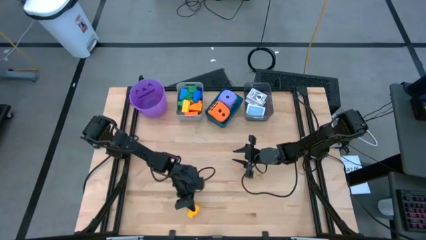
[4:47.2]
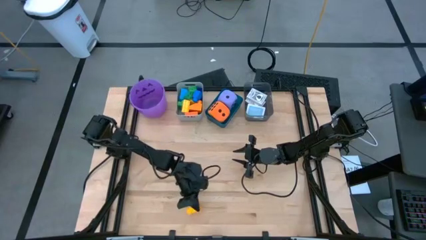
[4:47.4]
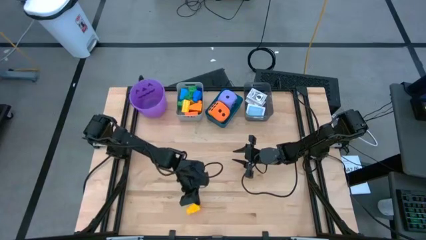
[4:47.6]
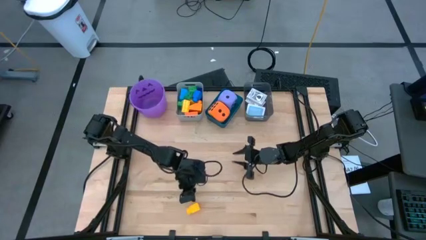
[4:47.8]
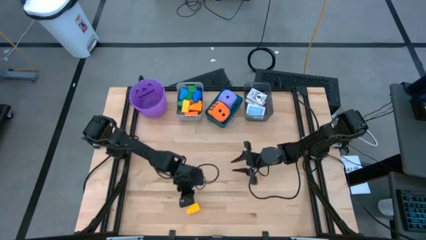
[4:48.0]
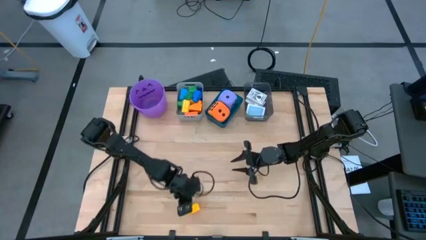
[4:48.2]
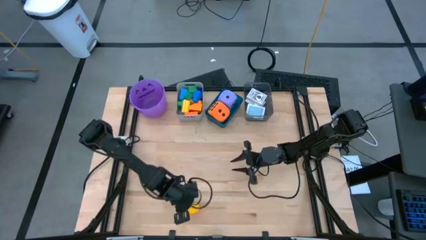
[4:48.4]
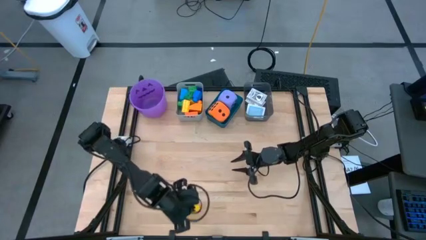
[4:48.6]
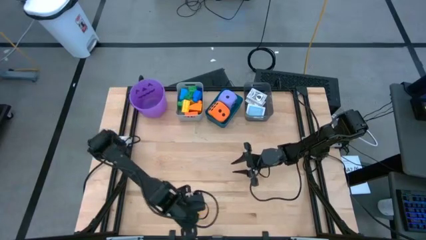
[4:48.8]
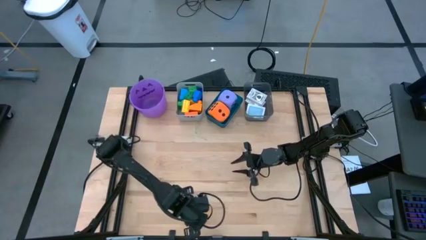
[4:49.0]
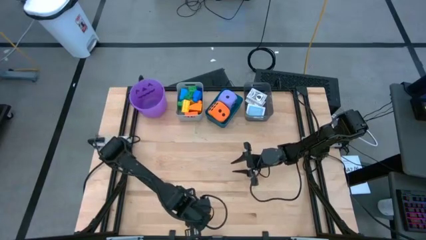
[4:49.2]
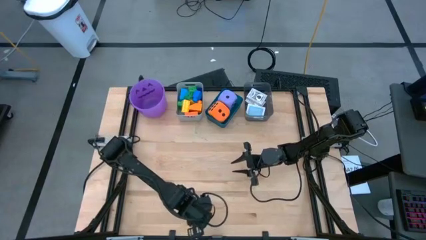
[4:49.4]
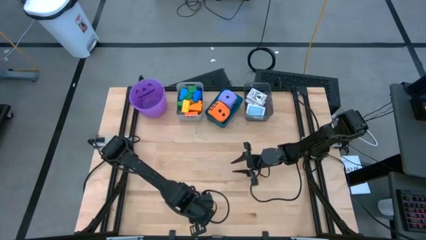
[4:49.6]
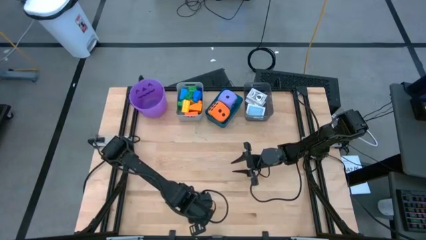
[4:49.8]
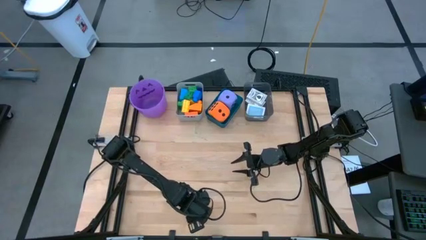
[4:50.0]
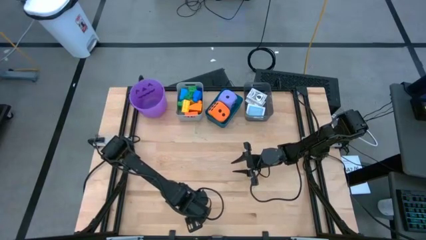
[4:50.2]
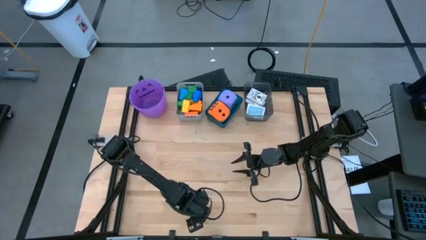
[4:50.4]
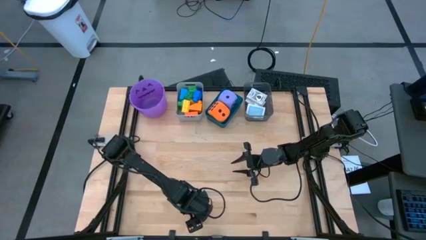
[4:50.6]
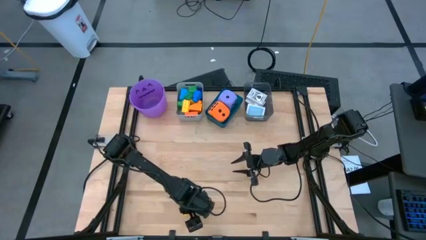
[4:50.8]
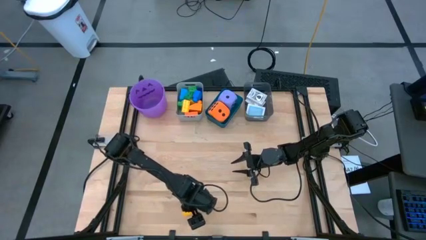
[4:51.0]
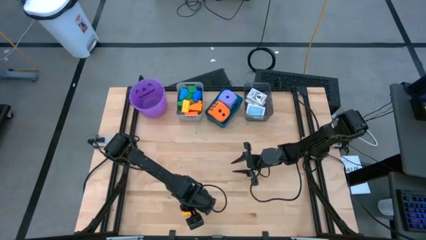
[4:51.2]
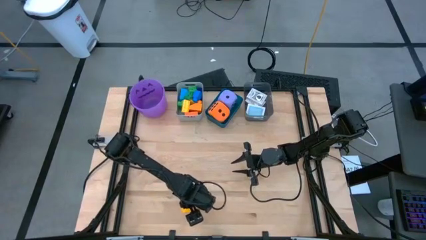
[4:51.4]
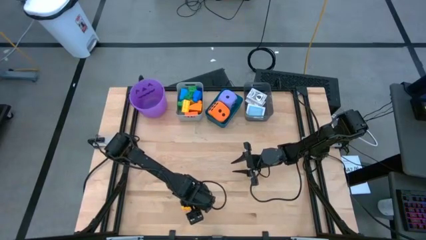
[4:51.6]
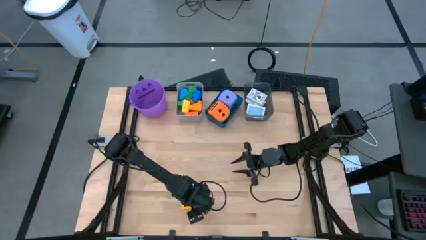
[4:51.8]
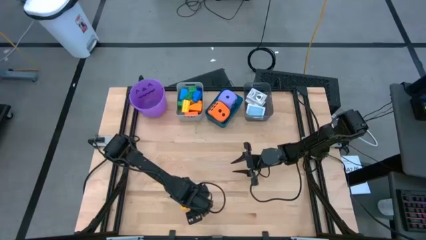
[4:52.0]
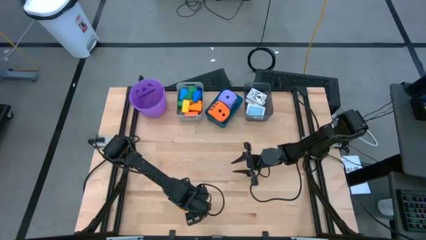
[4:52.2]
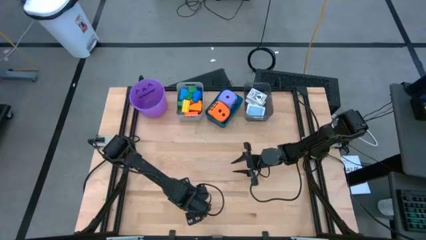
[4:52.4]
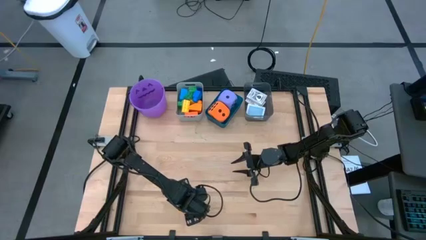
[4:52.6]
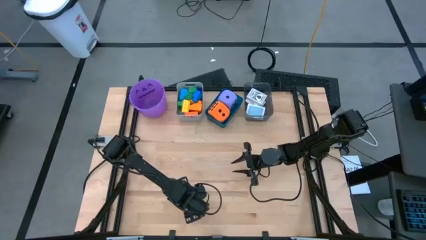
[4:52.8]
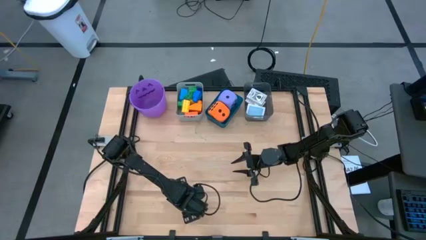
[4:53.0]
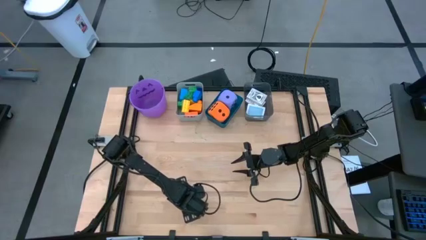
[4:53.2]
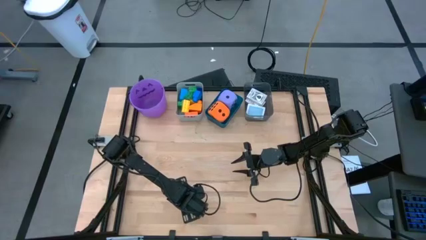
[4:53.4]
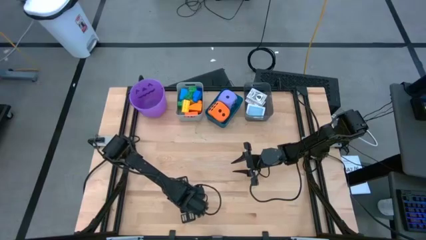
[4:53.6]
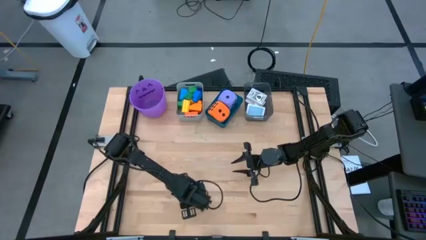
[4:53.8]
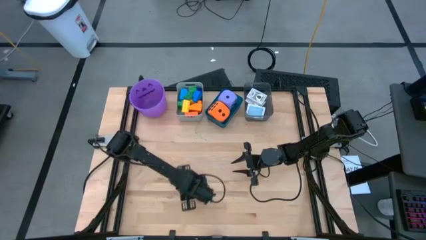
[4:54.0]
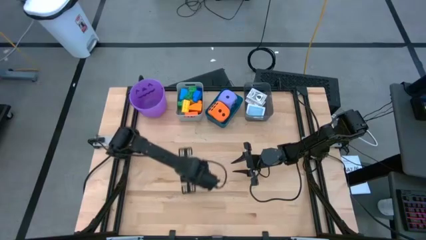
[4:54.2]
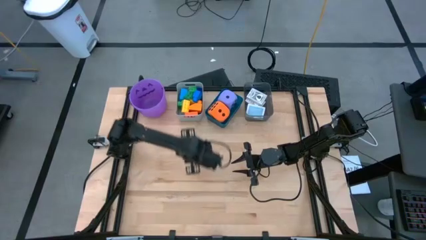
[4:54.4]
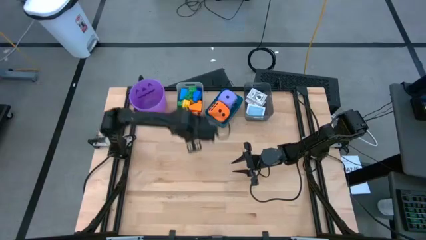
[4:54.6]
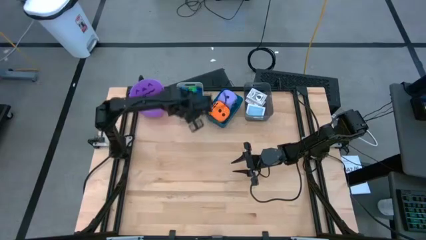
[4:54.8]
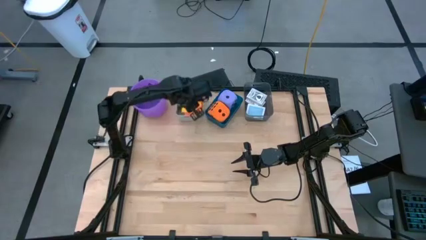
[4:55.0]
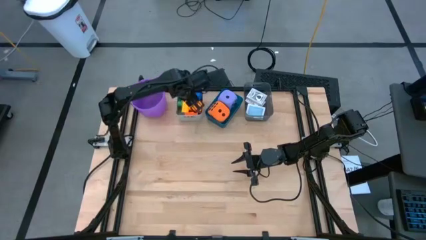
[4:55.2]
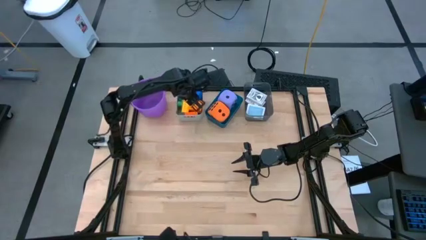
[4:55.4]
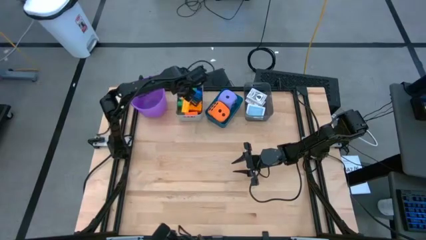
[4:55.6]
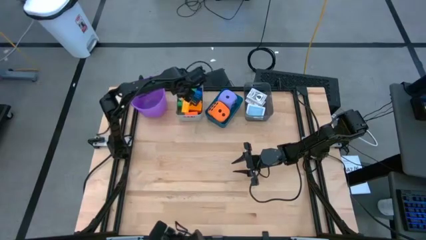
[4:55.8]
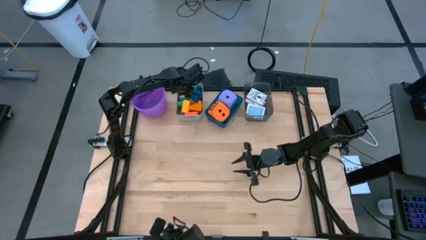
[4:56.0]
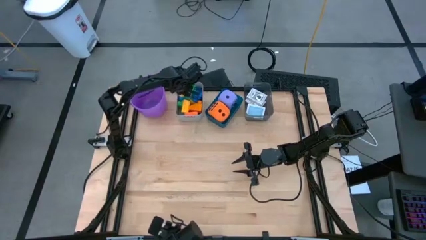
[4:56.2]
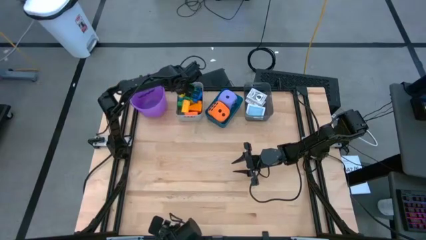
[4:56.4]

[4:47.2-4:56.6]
Task: Pick & Place Toys
Put the yellow game piece into the gray bin

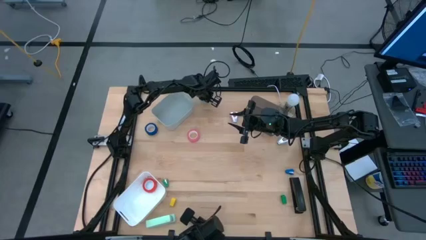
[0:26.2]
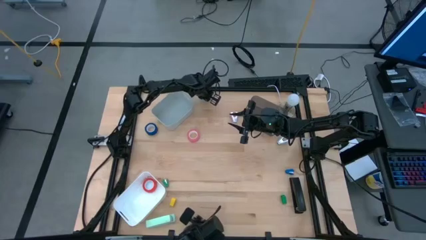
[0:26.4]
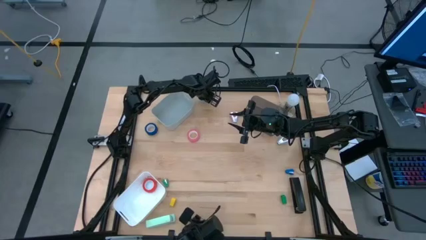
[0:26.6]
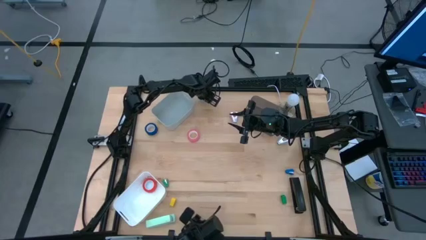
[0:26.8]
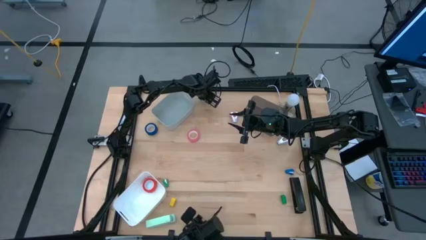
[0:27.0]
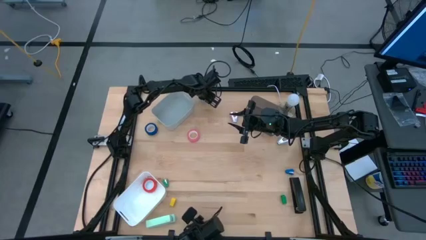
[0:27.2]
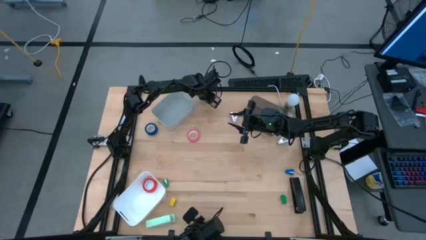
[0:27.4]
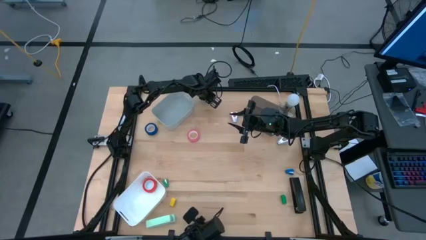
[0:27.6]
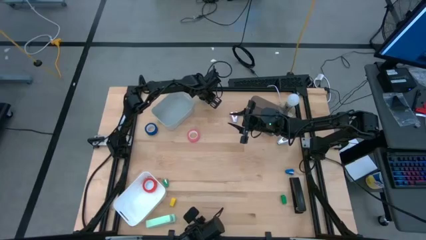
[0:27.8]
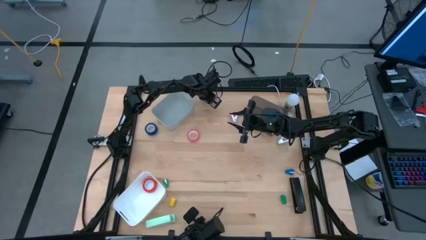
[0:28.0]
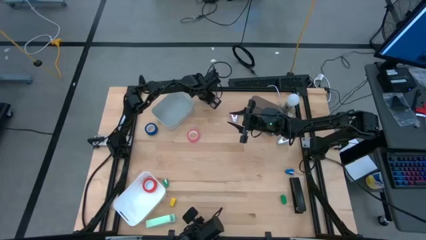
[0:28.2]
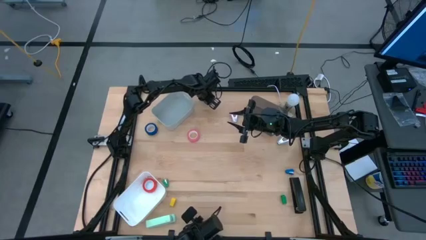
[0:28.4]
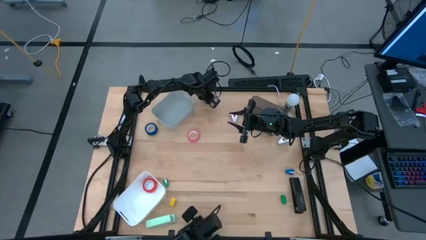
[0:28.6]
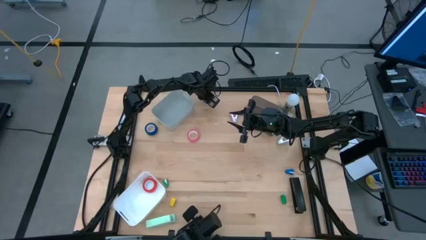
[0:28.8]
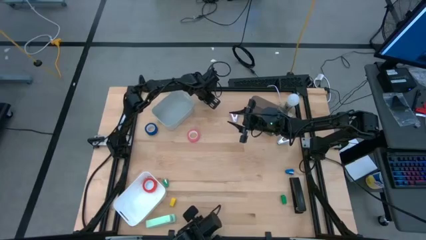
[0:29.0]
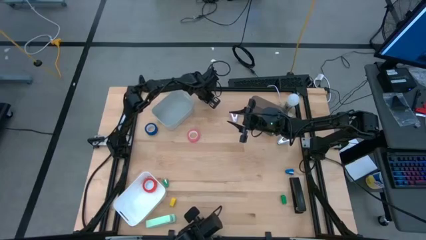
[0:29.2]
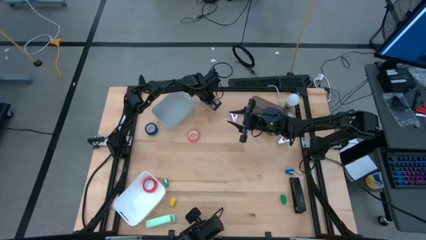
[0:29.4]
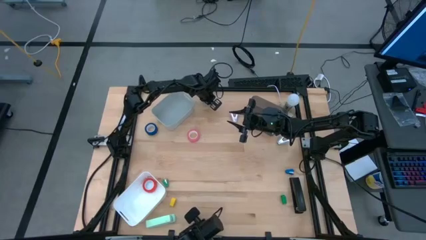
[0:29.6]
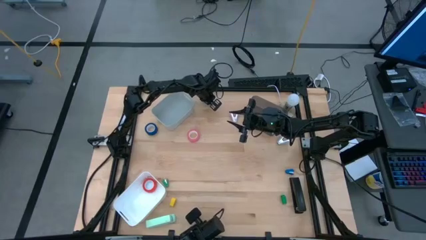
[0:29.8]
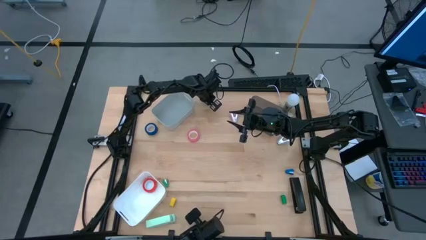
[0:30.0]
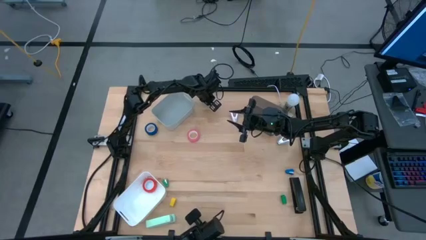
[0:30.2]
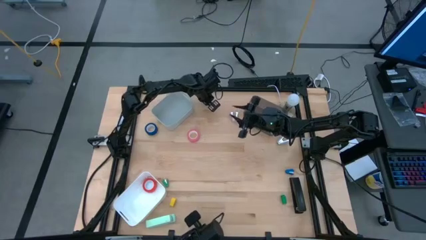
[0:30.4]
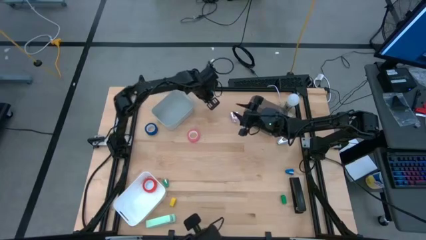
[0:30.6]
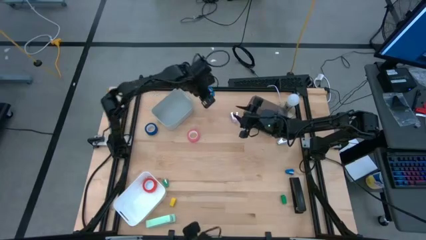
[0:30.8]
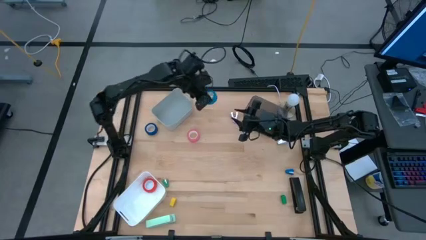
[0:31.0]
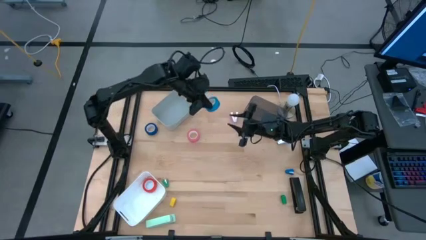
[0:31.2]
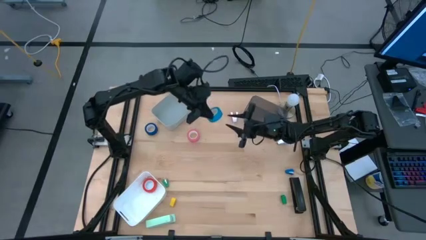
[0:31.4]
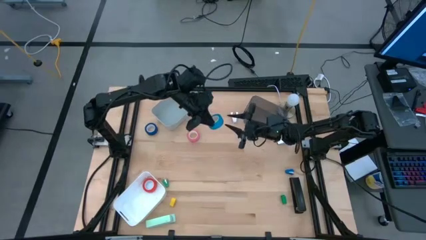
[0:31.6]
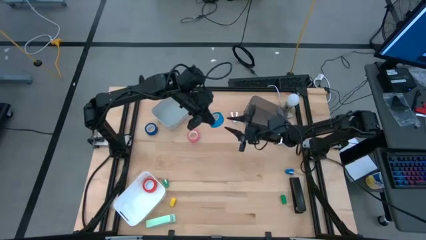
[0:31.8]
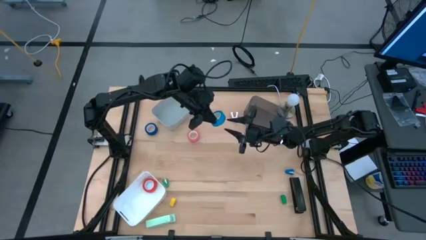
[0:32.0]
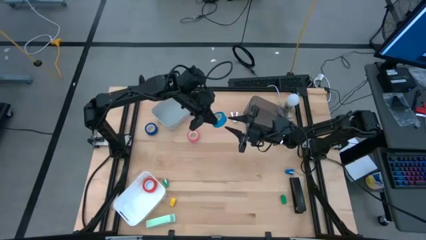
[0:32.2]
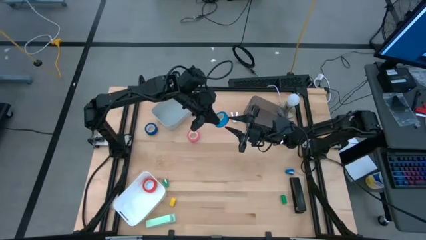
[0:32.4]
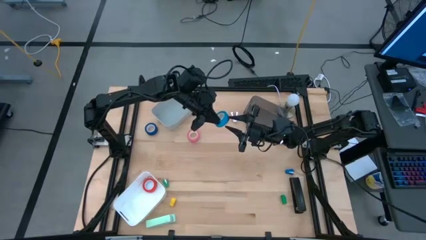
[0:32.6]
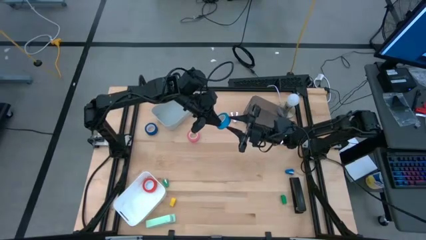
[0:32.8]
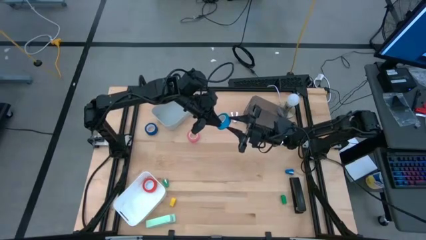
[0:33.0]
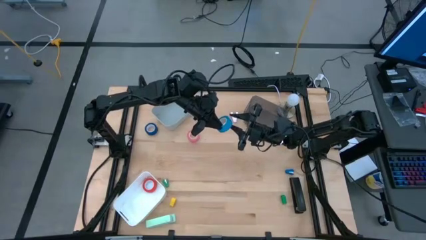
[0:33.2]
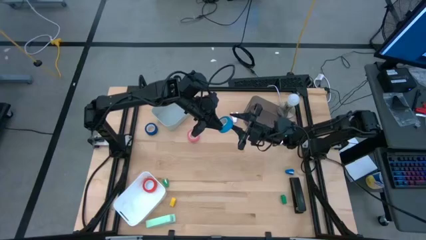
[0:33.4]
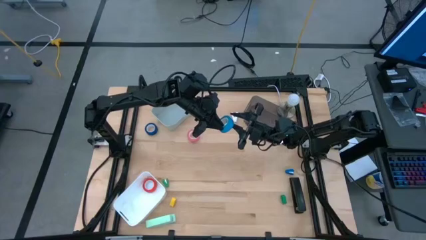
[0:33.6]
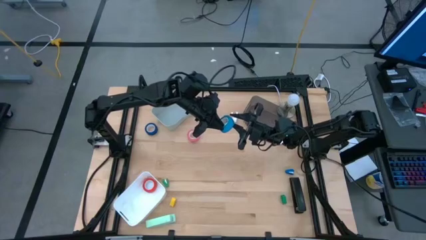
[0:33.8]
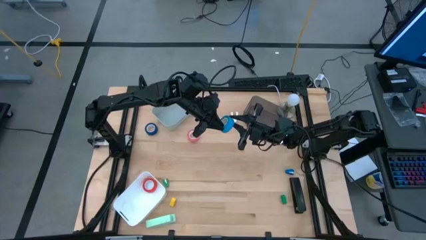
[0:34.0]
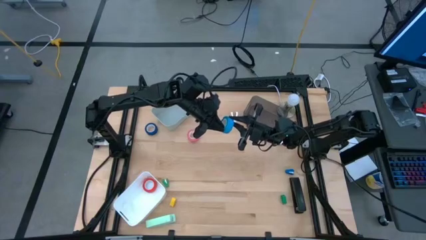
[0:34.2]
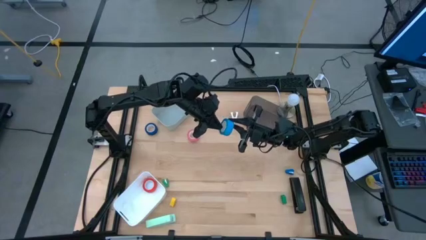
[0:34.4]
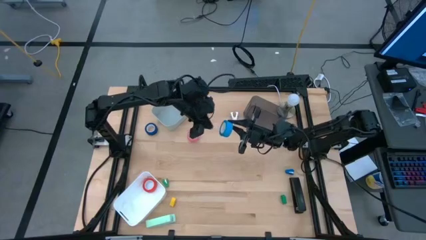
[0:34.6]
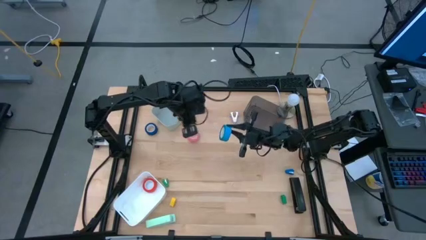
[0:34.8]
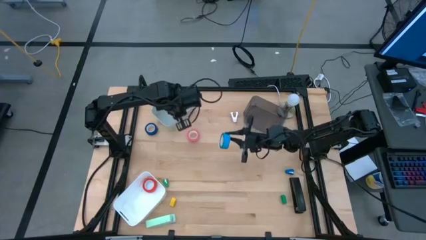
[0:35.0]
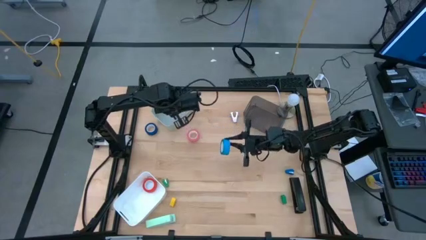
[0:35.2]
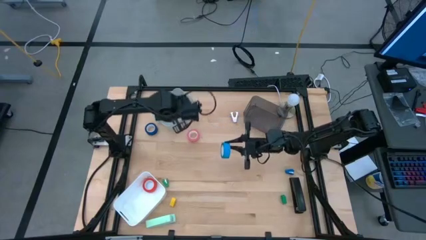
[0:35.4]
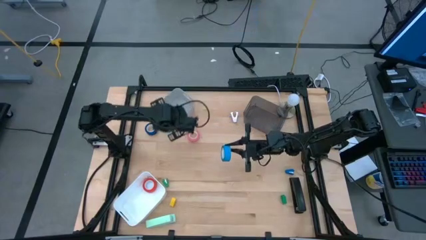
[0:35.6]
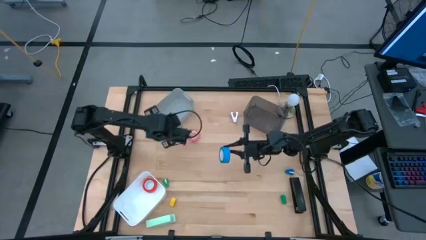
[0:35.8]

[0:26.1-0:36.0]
Task: Pick and place Stapler, Stapler remover, tape
Put the light blue tape into the white bin
